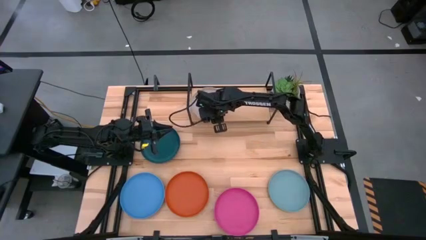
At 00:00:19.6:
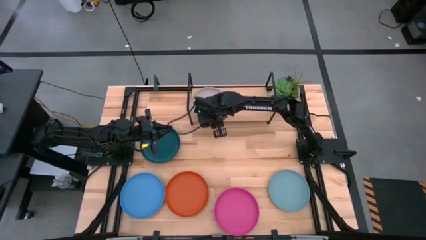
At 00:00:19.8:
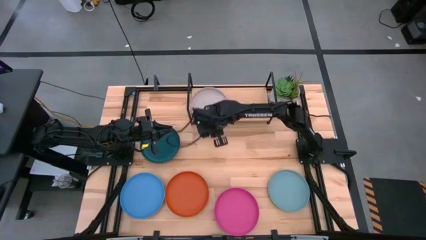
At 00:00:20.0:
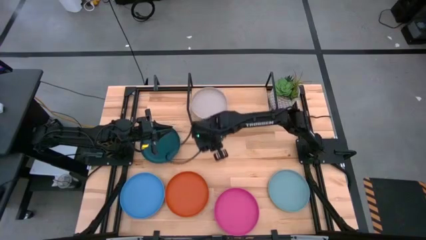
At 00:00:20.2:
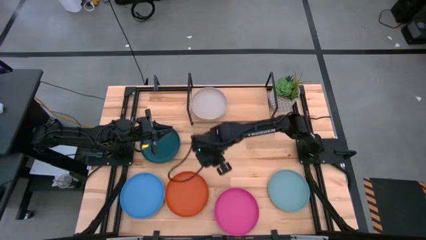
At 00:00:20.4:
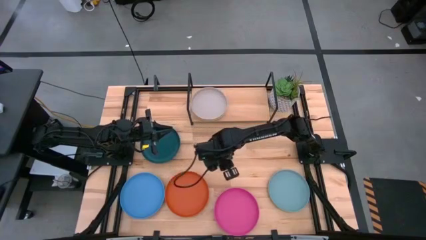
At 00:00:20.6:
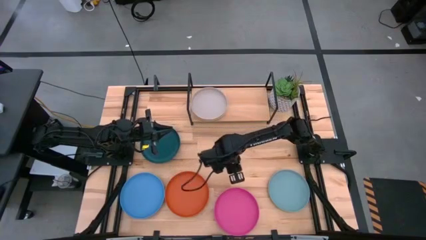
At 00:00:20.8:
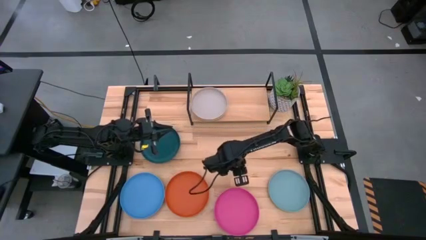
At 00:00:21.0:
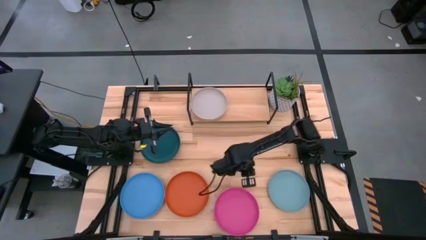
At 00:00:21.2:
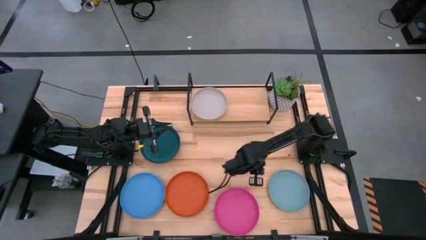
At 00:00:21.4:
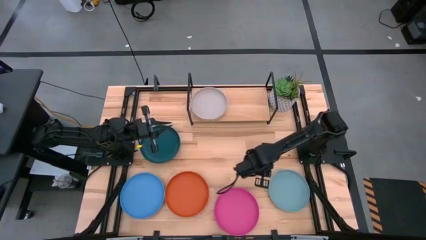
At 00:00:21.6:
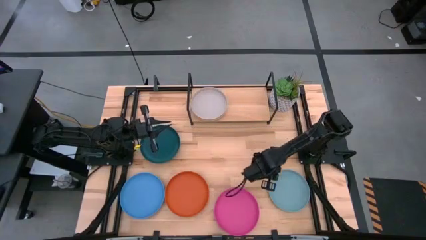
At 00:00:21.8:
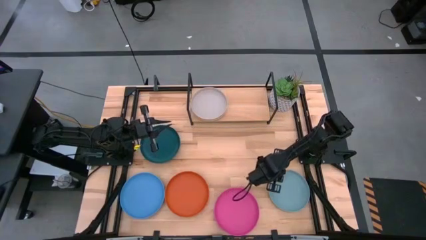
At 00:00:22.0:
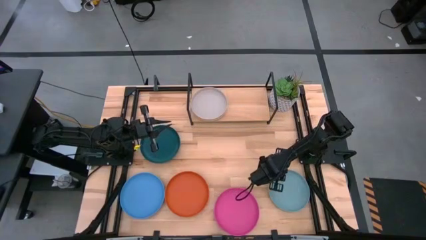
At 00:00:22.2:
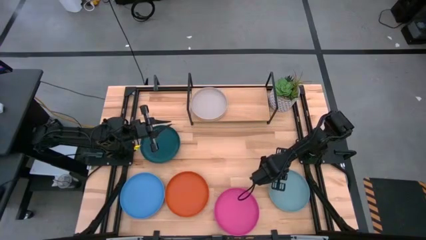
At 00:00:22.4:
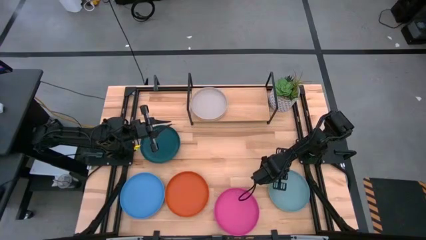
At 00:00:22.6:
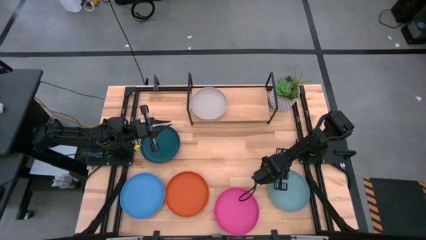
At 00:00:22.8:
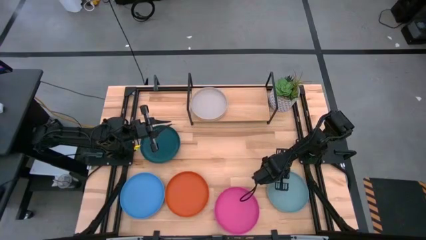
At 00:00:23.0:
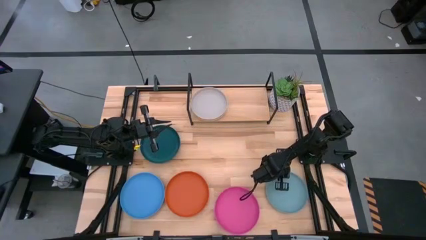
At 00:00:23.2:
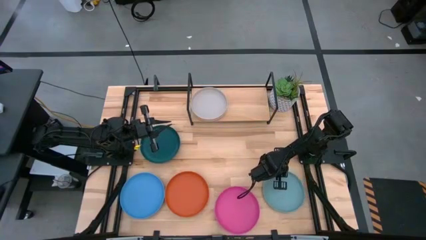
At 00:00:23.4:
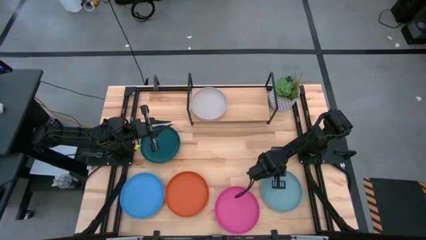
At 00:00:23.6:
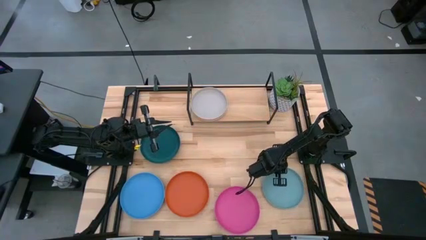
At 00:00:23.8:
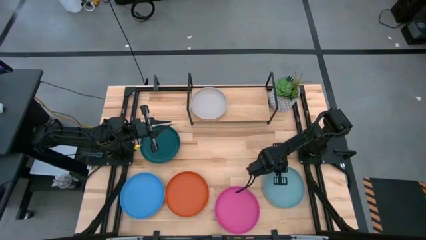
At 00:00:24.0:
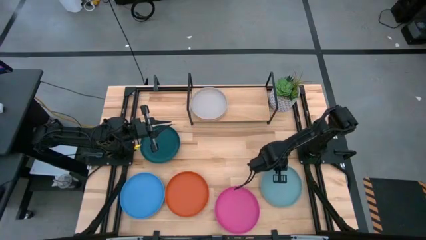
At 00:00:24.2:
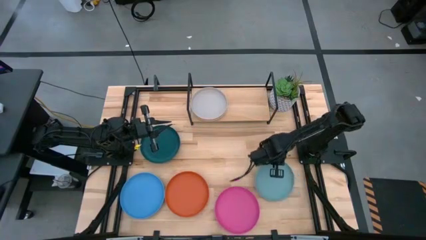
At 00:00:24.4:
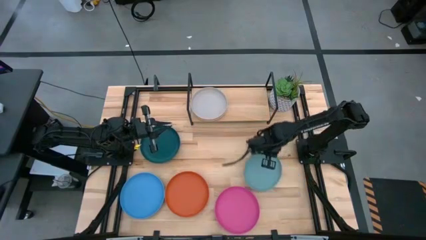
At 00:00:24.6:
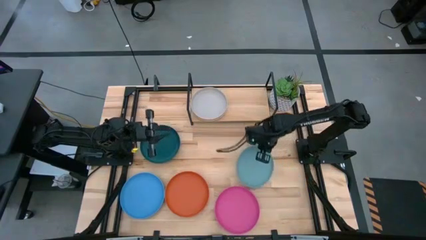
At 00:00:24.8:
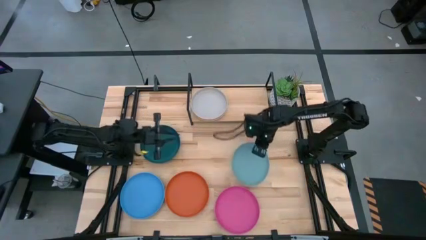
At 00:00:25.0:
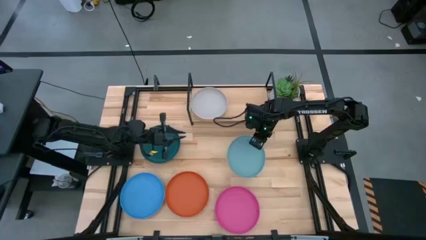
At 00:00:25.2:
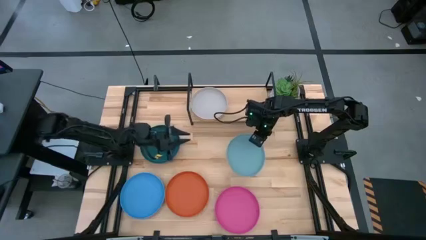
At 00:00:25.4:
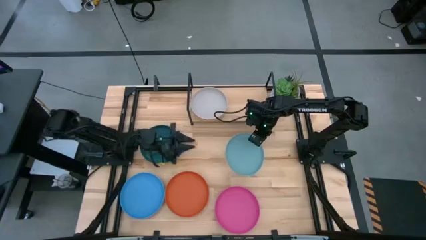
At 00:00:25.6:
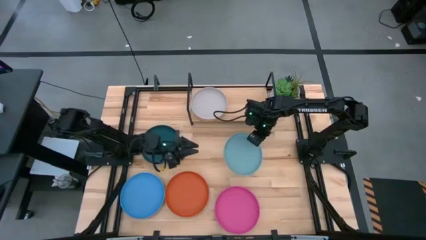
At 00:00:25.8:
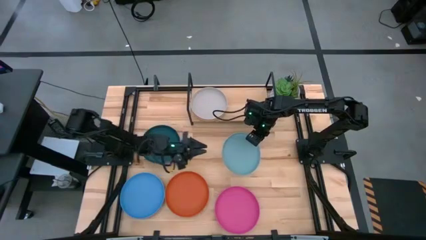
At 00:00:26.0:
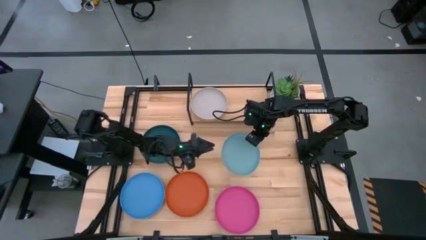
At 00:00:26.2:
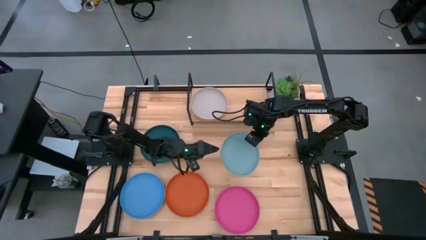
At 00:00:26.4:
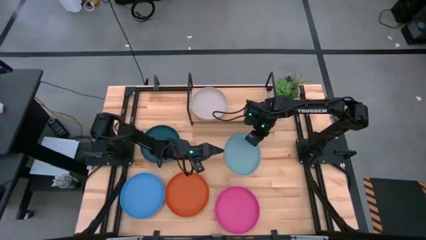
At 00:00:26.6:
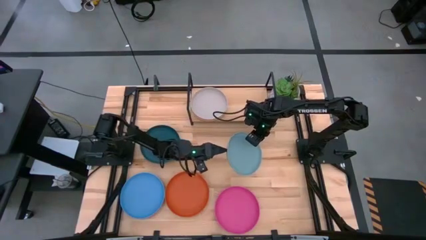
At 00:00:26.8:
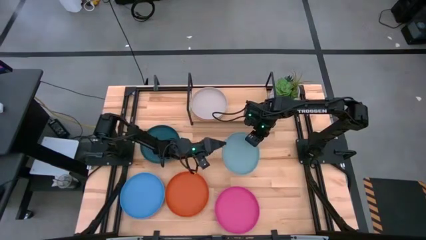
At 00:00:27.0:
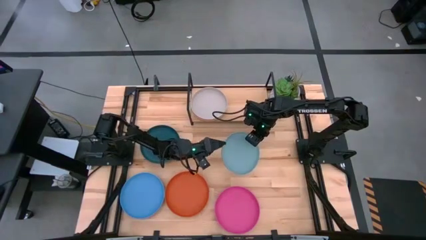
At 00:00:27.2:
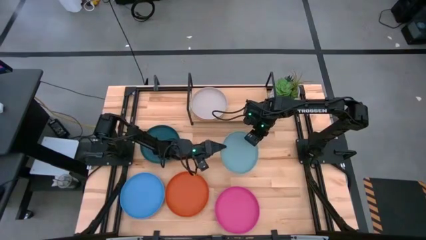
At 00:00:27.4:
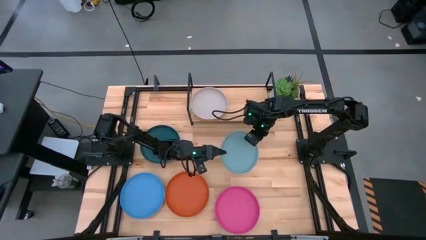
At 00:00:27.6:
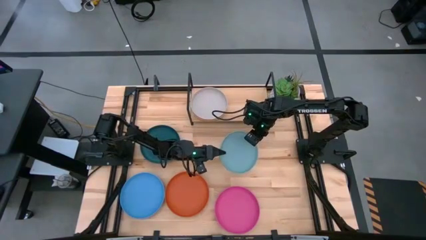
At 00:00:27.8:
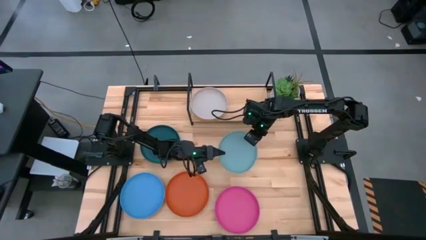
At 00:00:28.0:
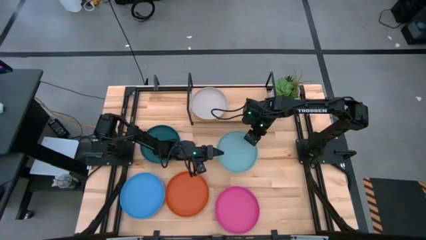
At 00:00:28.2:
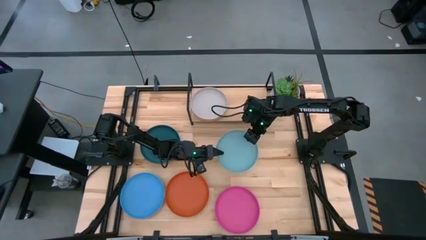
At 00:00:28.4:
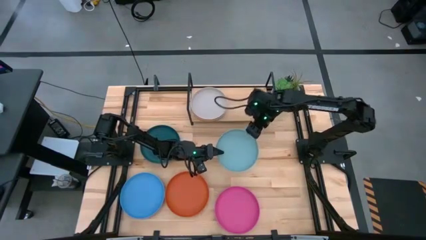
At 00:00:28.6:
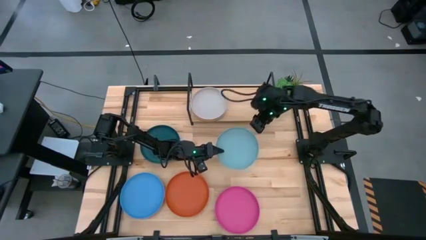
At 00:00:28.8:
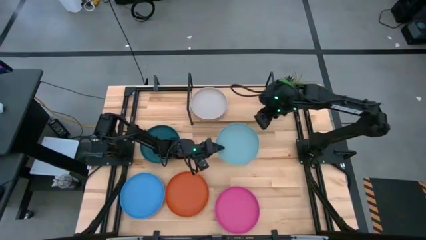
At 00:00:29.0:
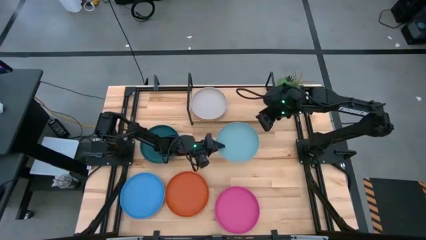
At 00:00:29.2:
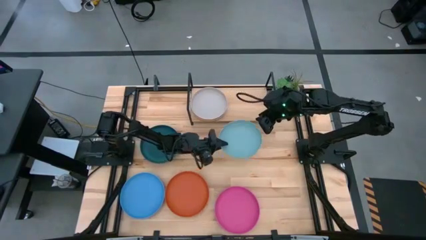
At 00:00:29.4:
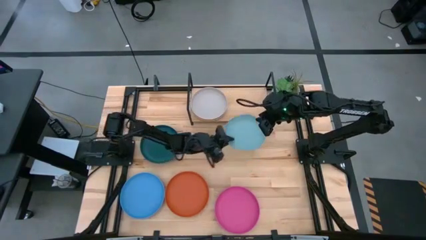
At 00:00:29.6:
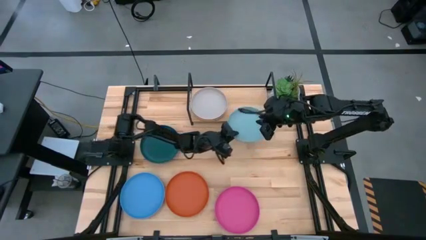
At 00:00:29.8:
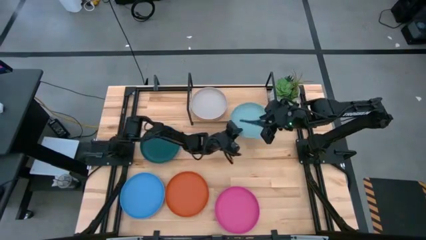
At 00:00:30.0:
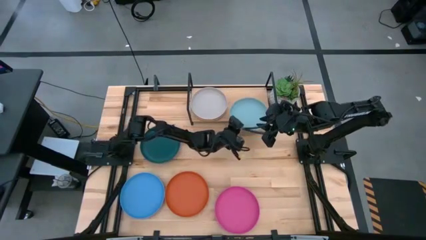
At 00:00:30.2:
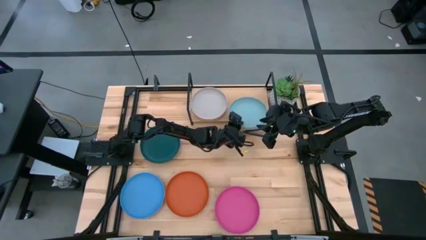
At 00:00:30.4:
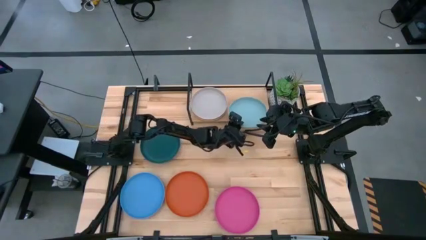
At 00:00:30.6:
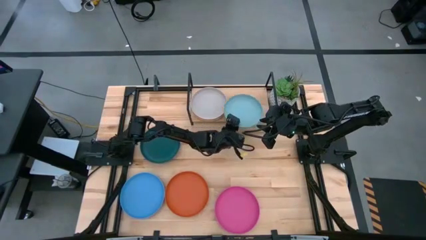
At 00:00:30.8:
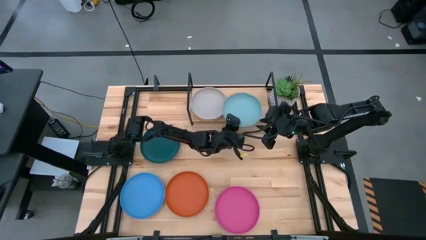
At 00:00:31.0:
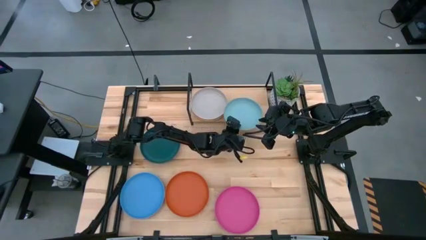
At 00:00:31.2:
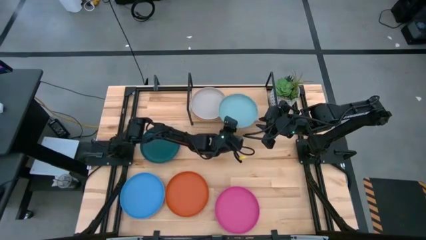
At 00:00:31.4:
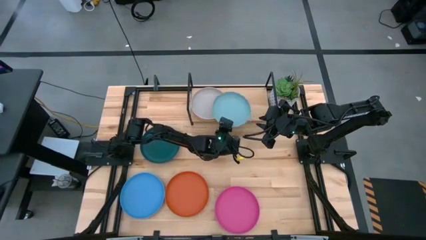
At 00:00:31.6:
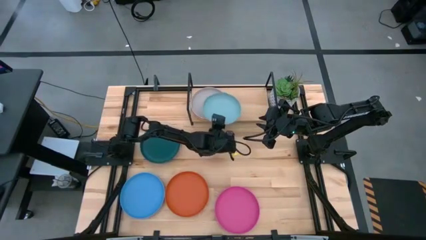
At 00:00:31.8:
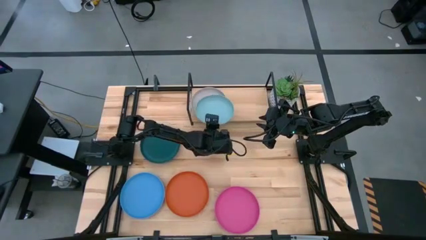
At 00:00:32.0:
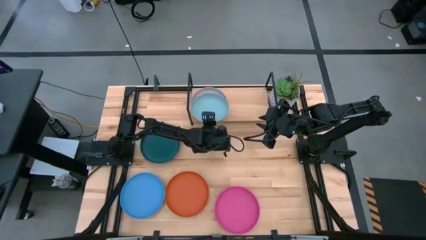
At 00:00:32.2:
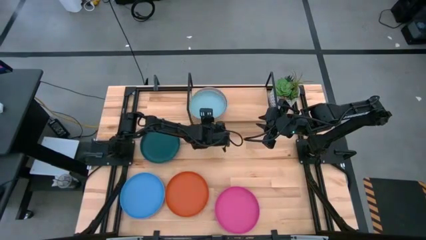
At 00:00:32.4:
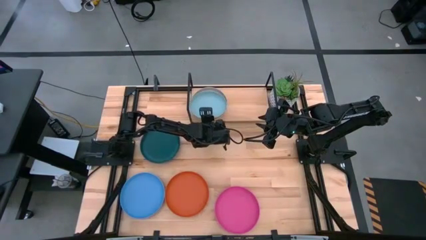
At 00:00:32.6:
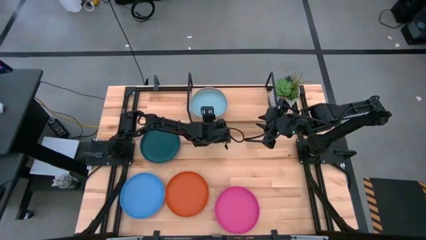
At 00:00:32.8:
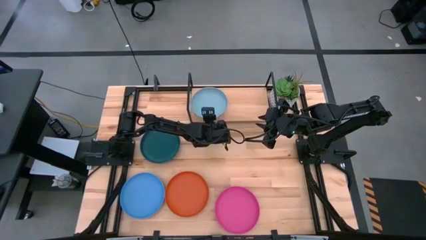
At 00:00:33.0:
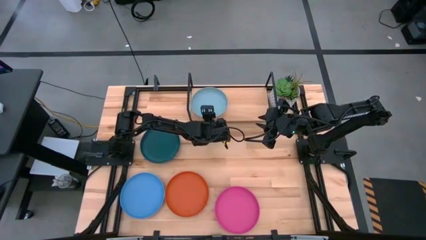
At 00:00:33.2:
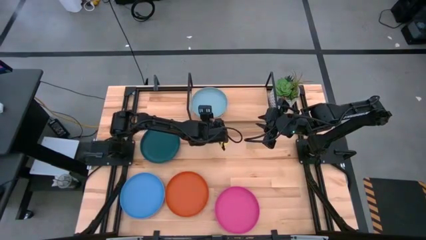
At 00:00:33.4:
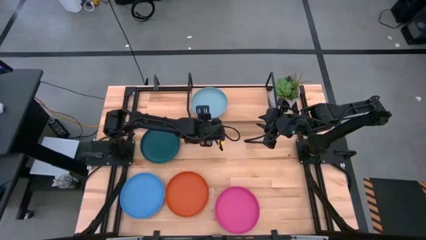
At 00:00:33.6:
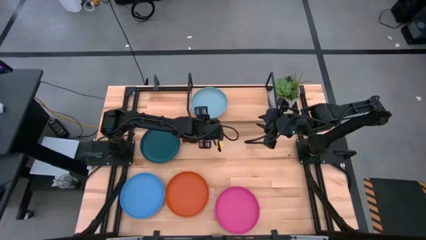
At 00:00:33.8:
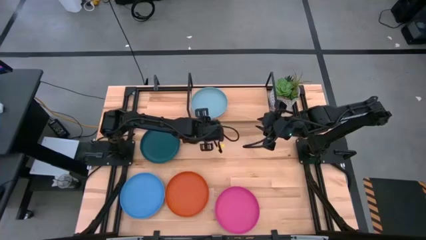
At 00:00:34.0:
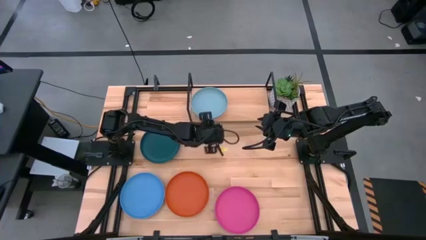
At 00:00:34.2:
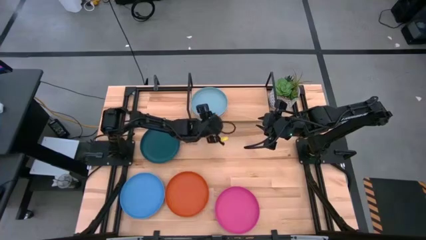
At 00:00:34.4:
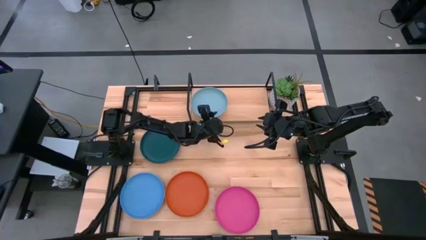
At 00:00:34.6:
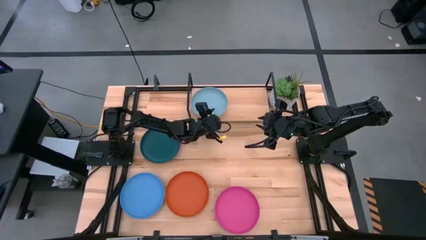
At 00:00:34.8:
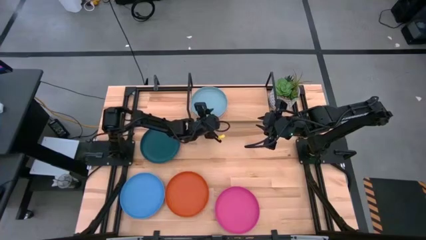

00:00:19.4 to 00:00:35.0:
Task: Place and stack plates onto a shelf
Stack the light blue plate on top of the gray plate on the shelf
